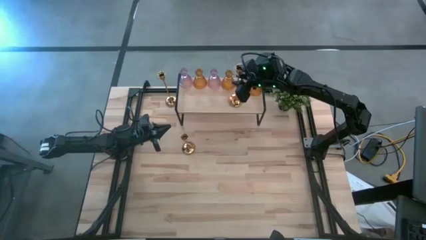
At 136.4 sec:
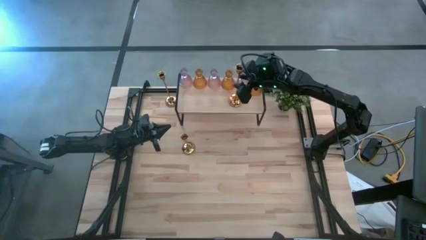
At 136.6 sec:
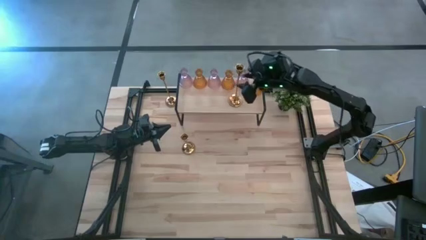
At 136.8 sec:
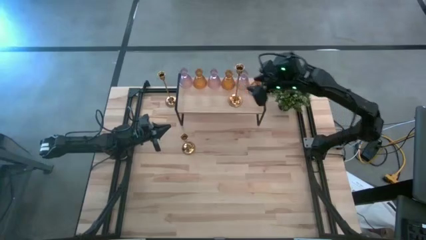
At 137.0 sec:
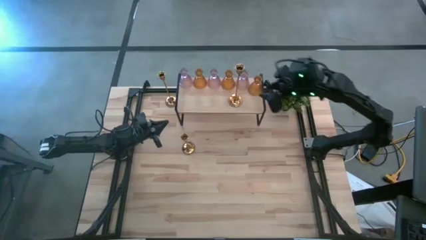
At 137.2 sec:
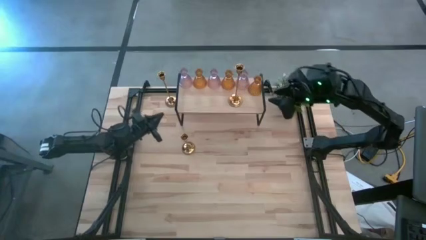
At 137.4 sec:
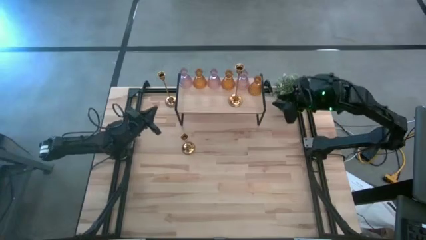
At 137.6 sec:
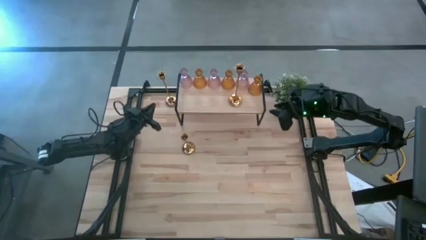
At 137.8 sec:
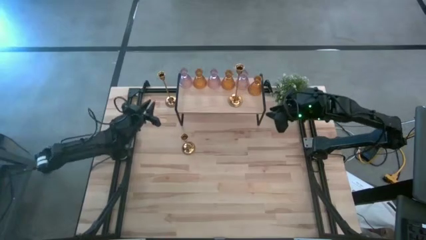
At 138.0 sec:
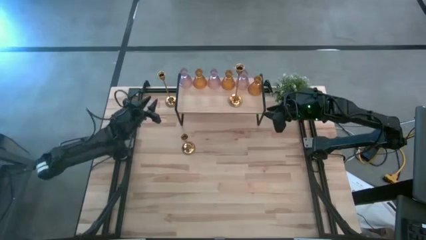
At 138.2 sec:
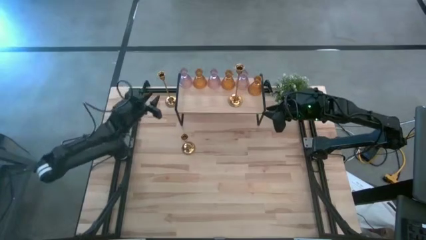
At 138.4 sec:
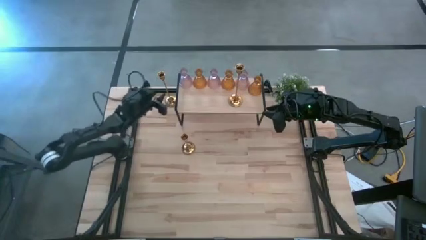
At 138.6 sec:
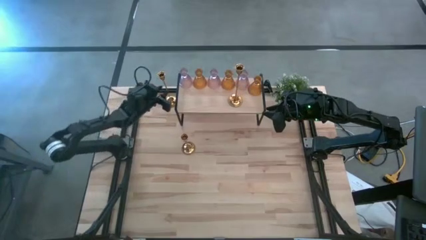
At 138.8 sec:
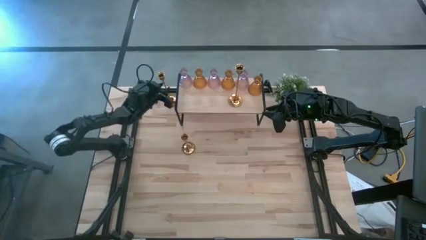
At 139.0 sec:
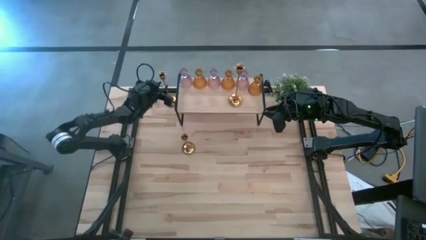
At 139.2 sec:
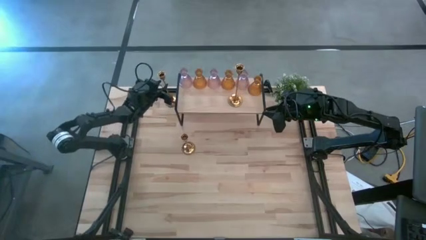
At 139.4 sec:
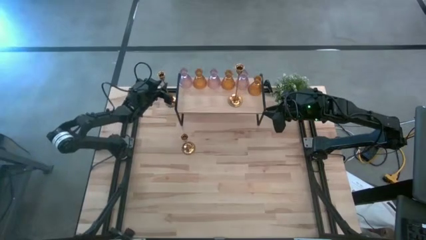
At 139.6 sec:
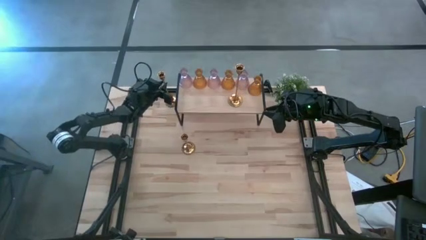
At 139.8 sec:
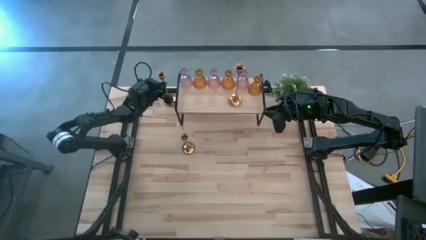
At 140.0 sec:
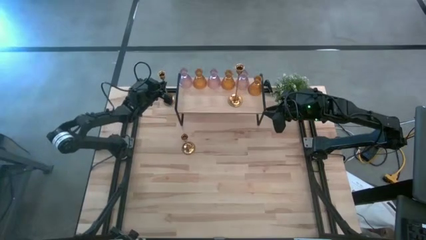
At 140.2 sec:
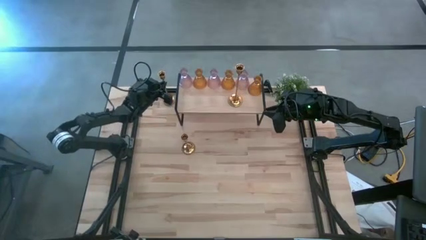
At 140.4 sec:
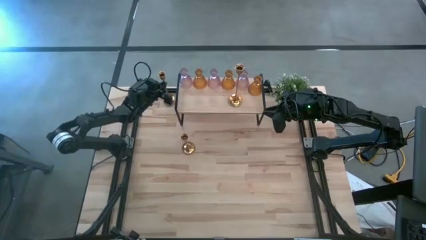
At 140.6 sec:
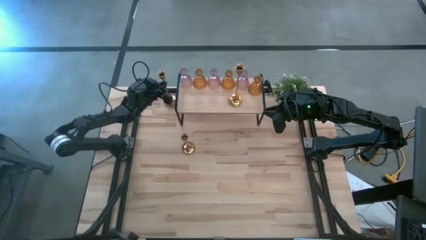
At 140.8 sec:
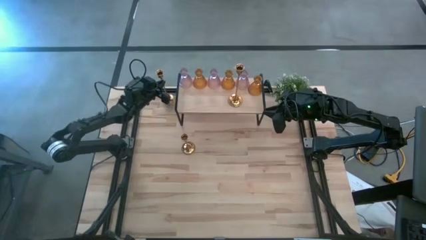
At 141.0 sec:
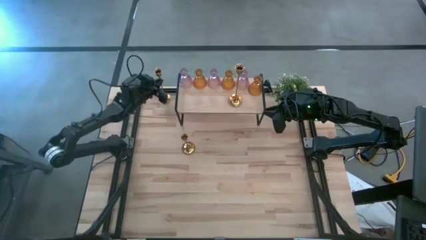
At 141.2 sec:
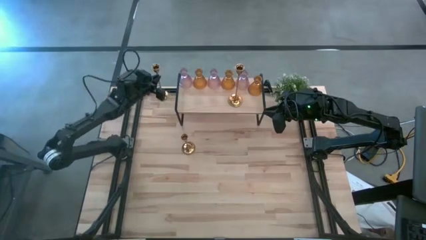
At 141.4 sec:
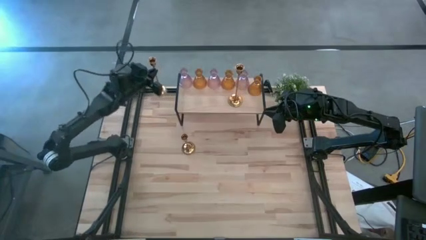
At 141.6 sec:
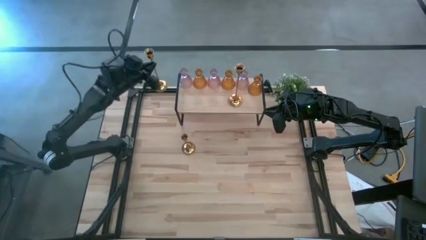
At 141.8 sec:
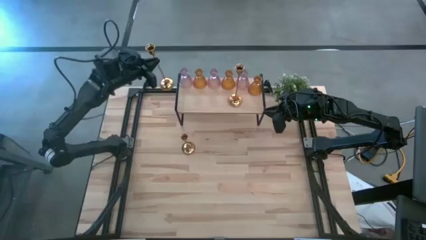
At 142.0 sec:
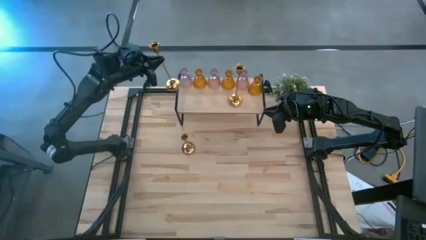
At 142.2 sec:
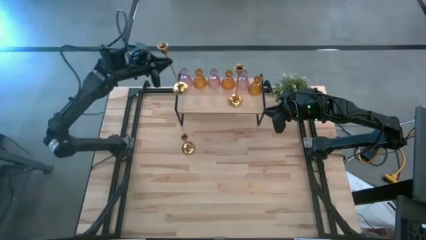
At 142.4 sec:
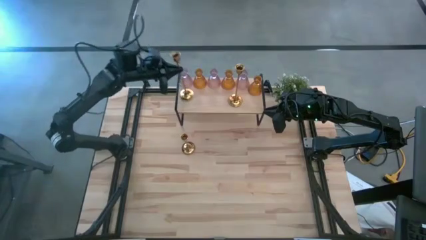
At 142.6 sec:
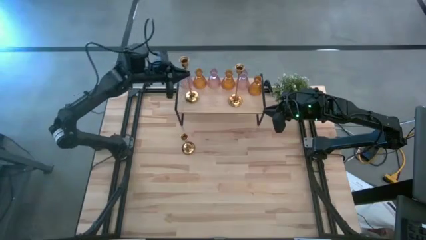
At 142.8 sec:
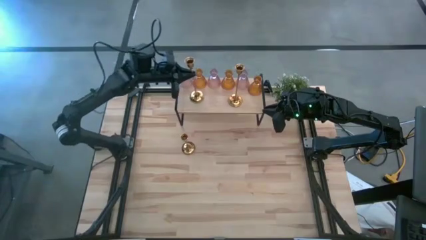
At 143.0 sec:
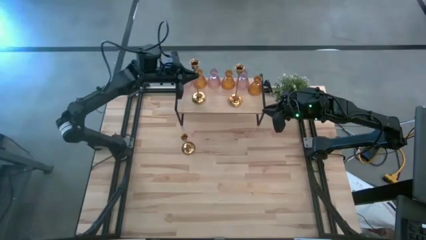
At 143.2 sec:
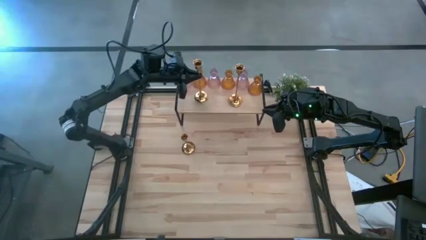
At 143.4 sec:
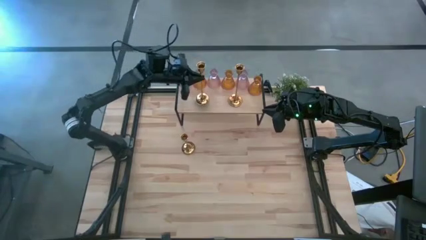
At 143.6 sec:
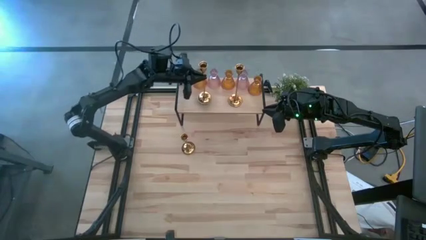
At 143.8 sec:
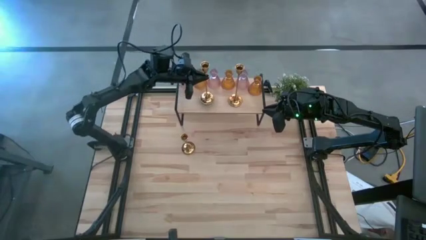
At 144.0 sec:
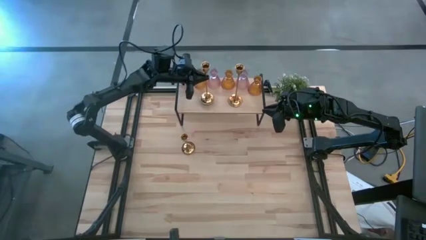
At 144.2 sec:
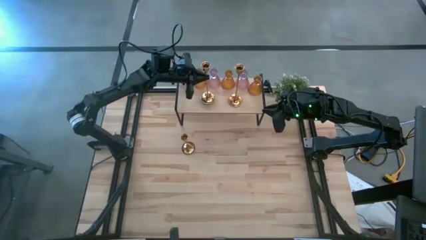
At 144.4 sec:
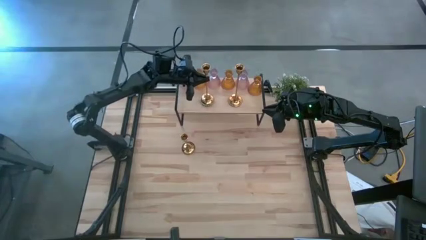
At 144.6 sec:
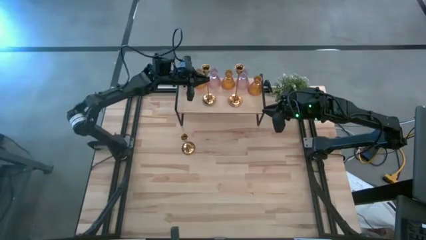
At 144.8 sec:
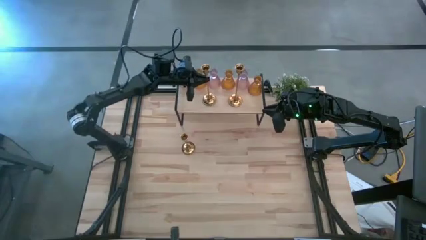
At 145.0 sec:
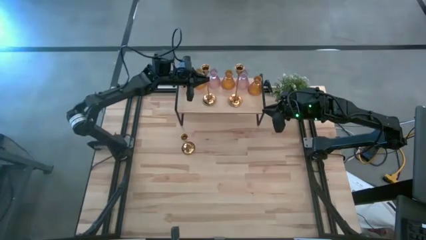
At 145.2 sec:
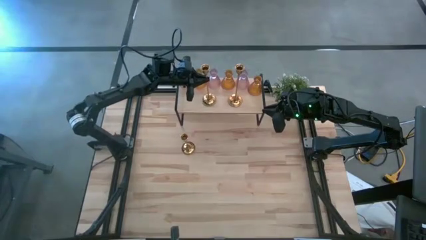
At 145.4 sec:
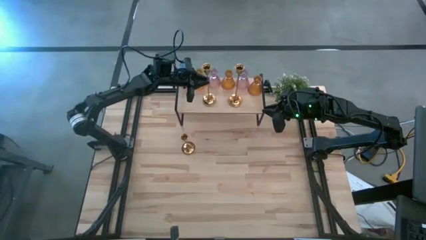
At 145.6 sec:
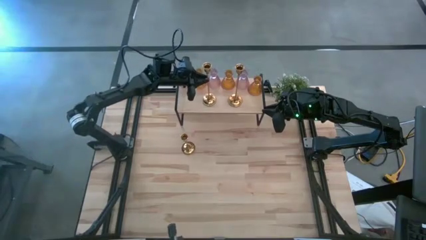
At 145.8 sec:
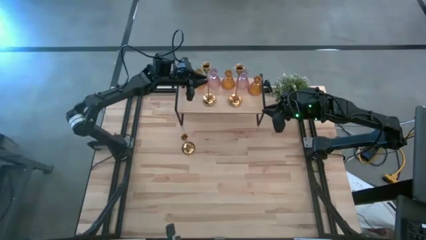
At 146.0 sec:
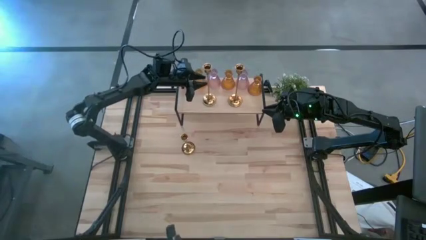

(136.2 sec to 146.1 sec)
Task: Pick & Place candle stick holders
Put the top gold candle holder on the shelf

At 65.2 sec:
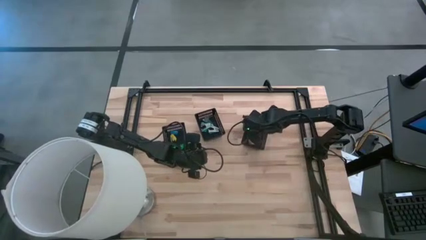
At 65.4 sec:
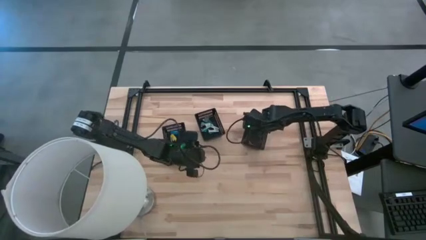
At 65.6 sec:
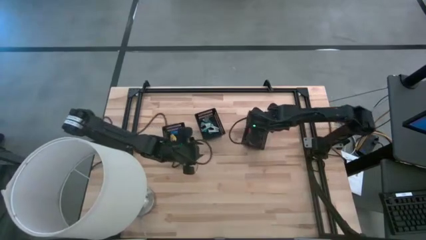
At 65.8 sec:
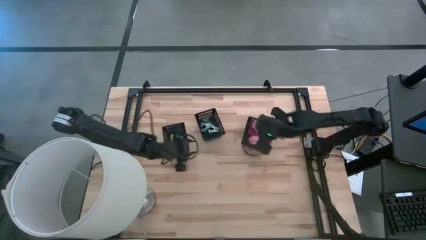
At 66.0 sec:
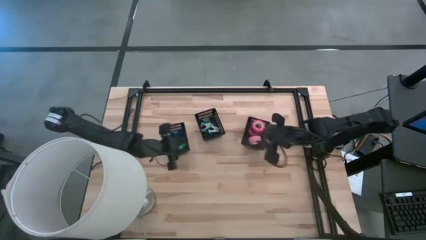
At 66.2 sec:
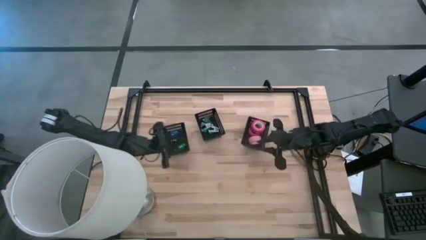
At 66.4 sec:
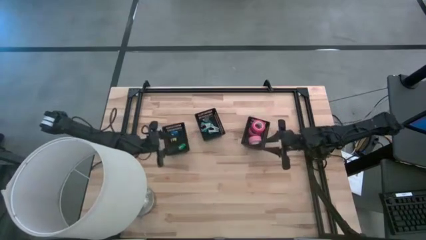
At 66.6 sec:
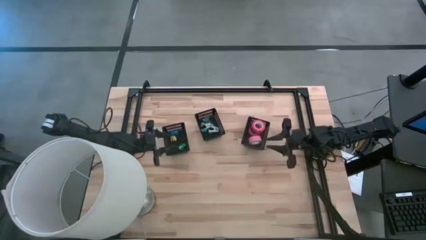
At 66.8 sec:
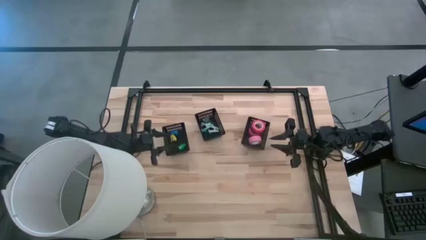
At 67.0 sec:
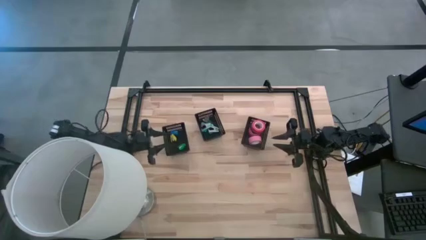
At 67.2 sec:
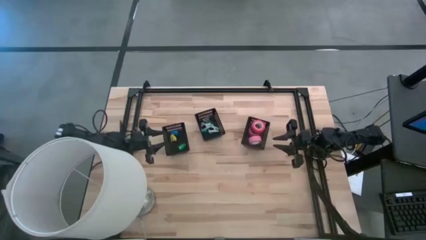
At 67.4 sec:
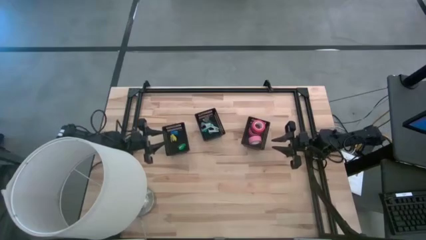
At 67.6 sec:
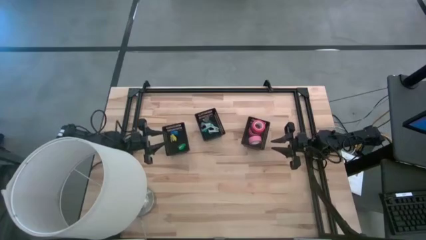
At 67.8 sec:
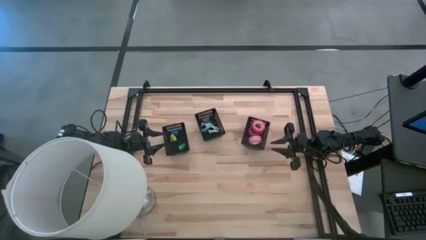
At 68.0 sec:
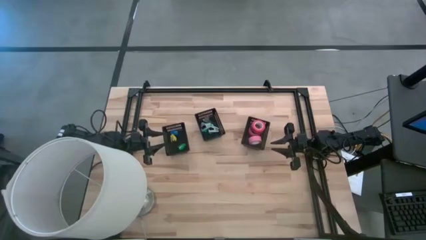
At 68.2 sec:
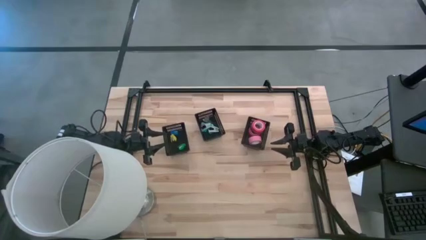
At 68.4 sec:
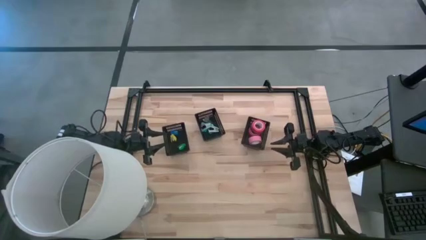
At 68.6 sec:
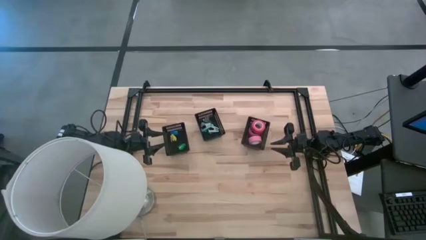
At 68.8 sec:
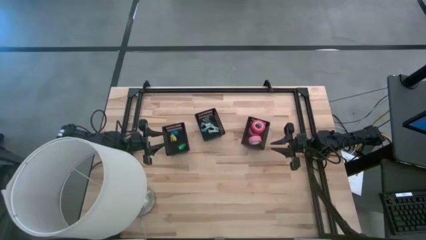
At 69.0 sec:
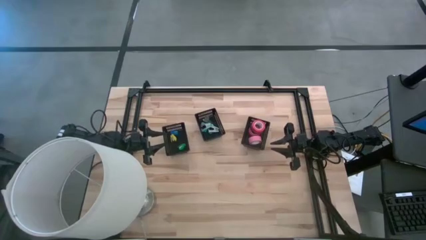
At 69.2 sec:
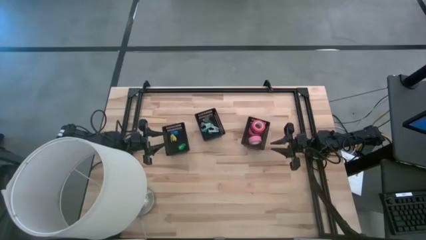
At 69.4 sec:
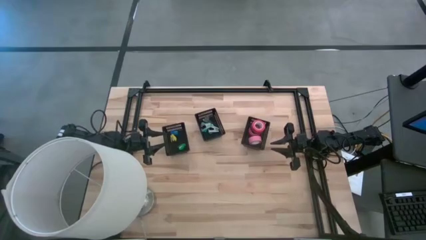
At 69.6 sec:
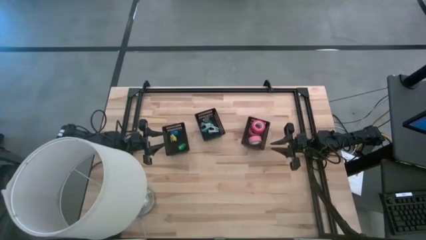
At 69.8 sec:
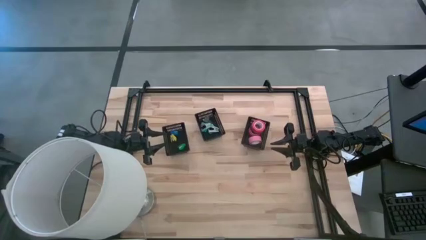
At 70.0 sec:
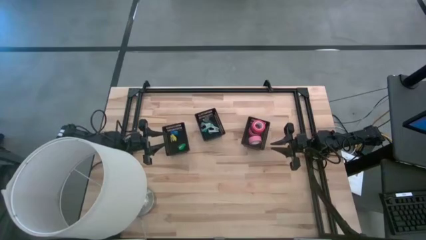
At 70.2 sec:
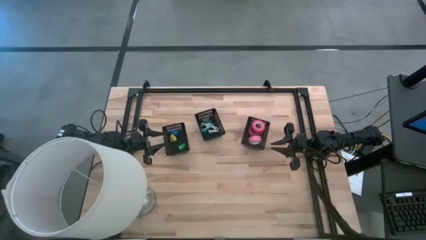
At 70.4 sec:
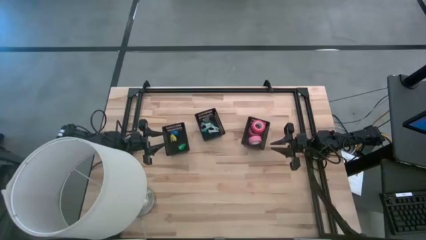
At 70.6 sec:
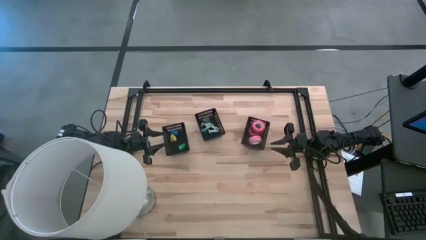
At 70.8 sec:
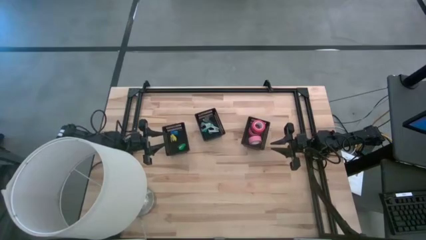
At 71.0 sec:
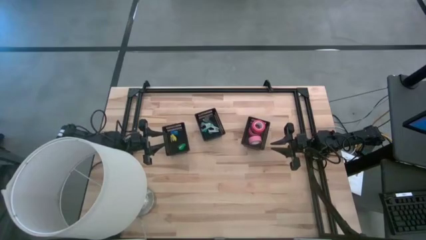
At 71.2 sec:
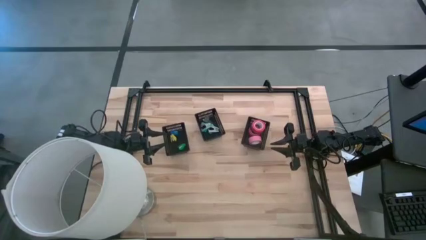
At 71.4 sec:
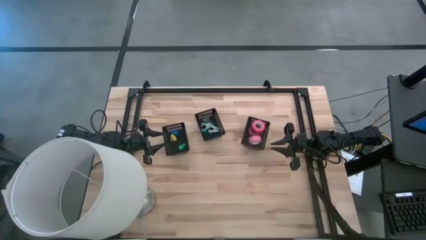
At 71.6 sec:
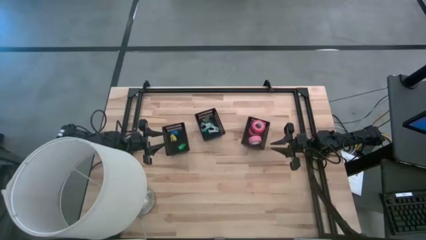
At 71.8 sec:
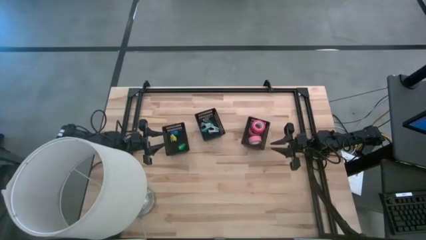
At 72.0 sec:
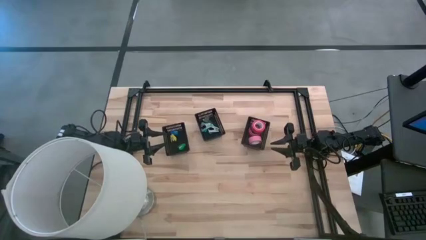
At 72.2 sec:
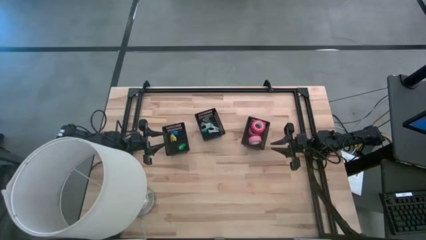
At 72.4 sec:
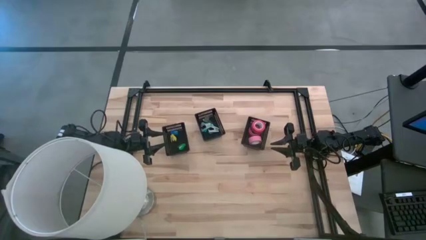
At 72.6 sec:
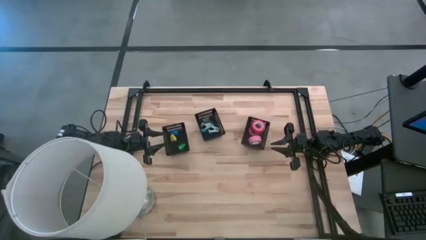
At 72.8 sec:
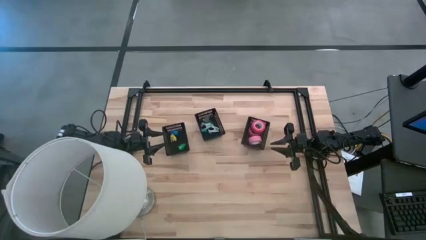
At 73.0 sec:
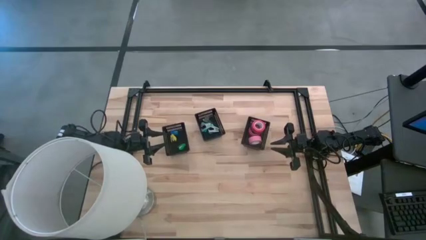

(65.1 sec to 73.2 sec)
Task: Pick and place Stapler, Stapler remover, tape
Return to Home Position
